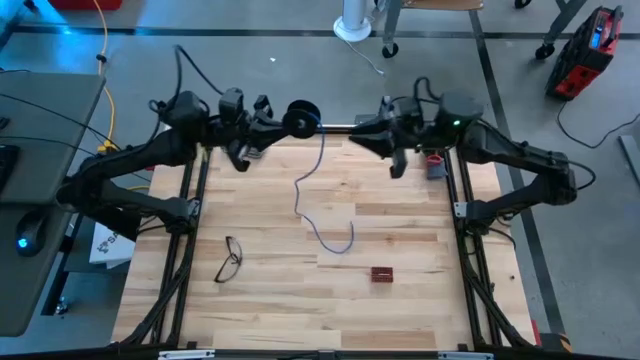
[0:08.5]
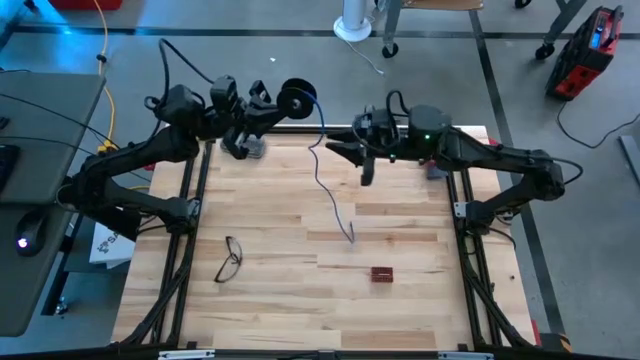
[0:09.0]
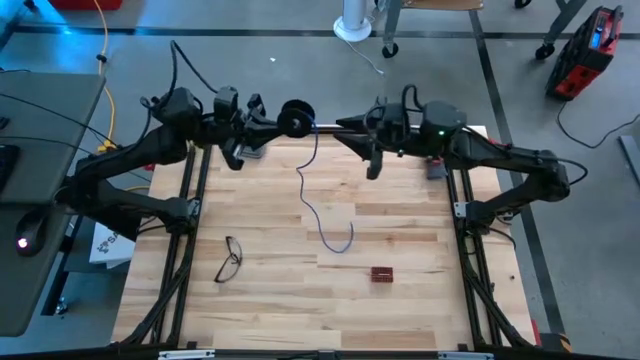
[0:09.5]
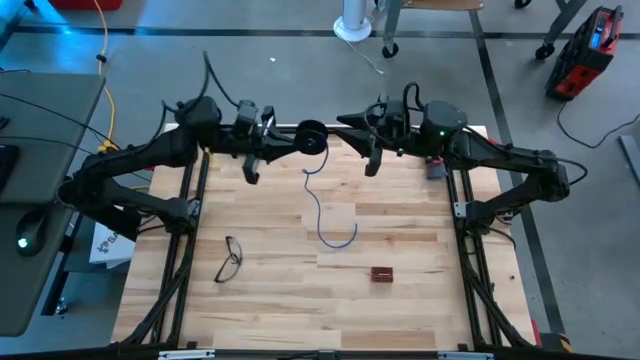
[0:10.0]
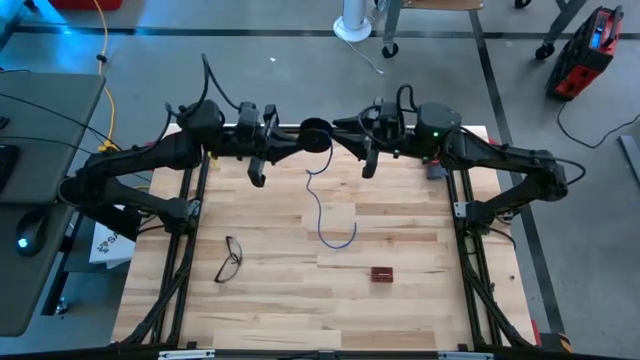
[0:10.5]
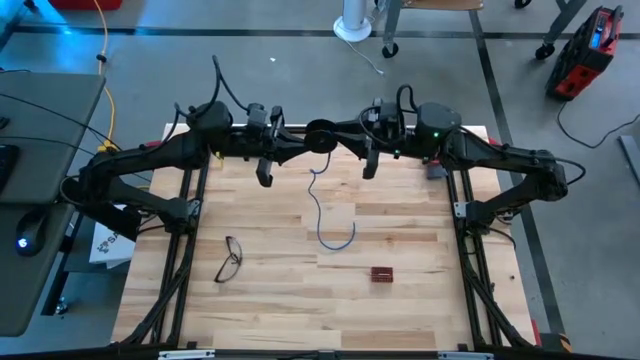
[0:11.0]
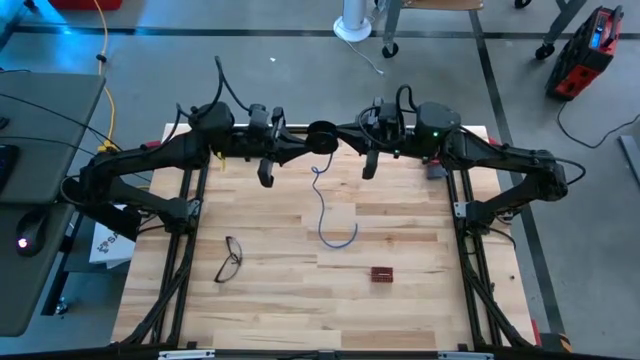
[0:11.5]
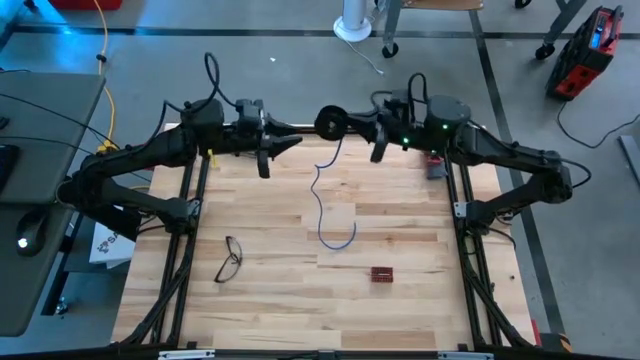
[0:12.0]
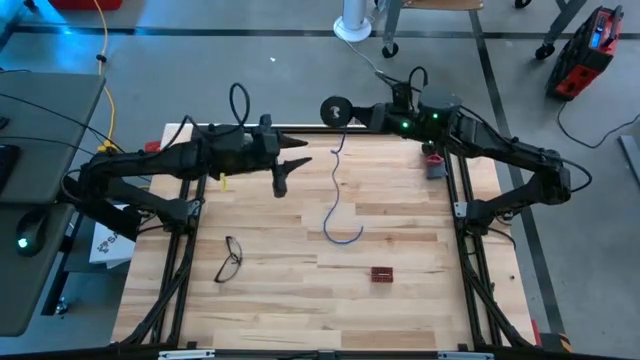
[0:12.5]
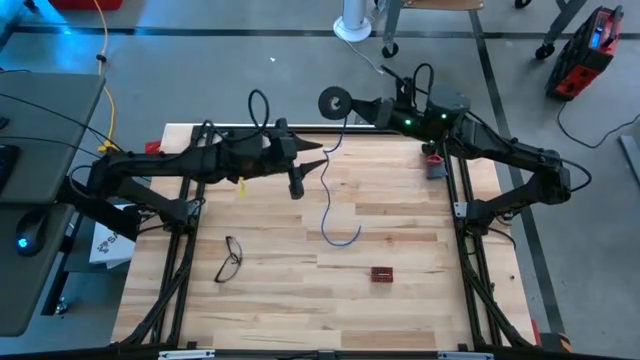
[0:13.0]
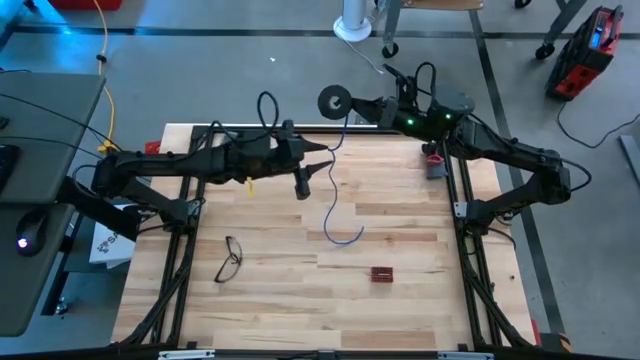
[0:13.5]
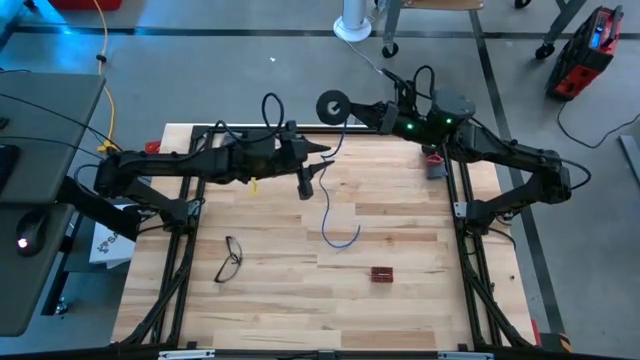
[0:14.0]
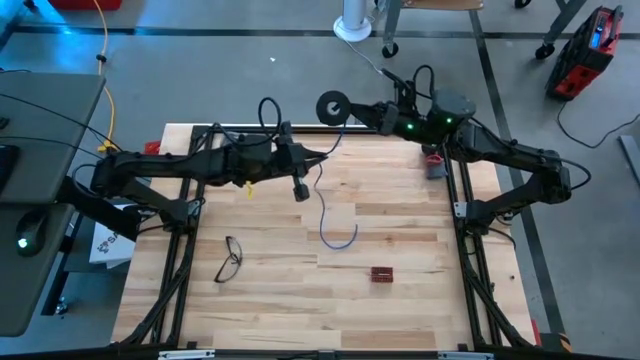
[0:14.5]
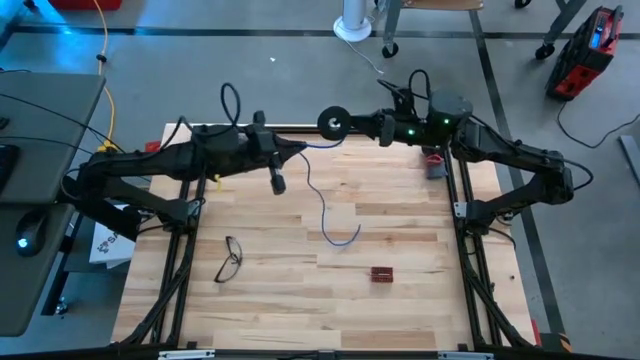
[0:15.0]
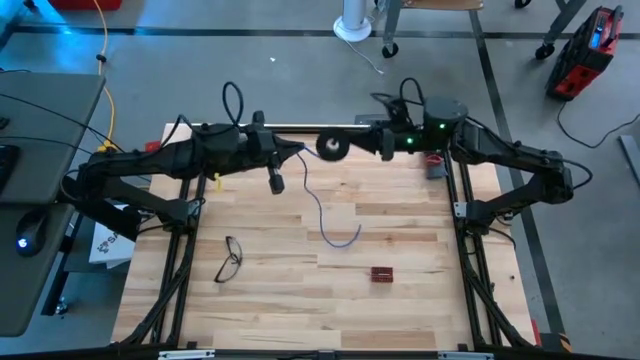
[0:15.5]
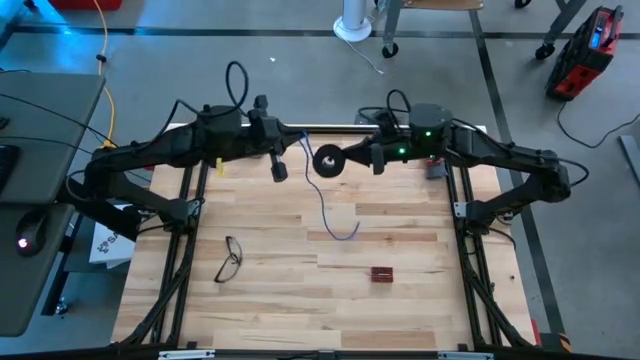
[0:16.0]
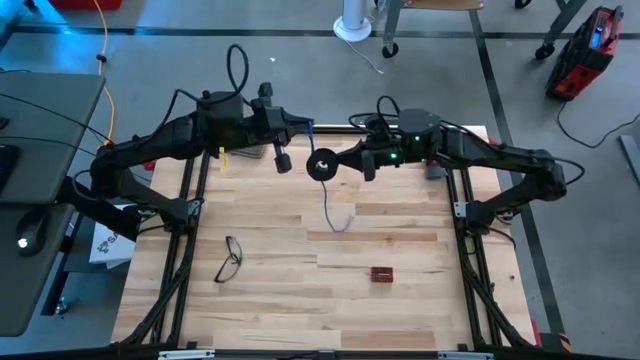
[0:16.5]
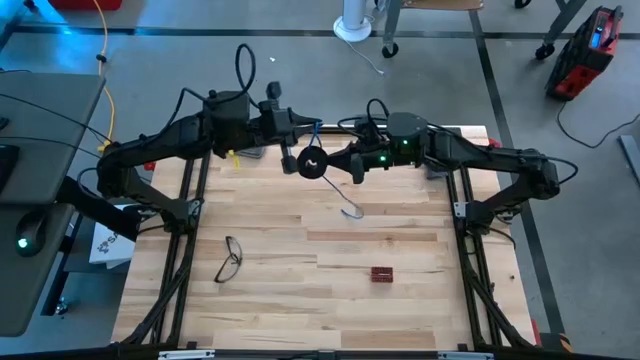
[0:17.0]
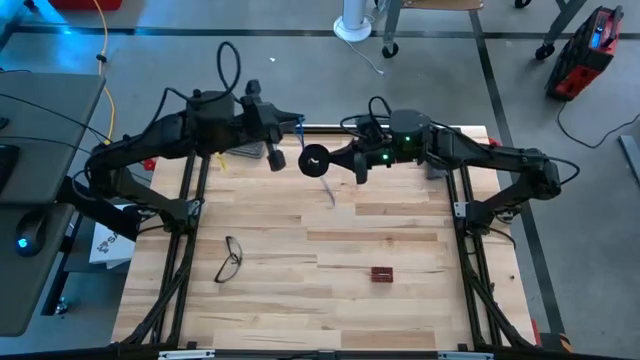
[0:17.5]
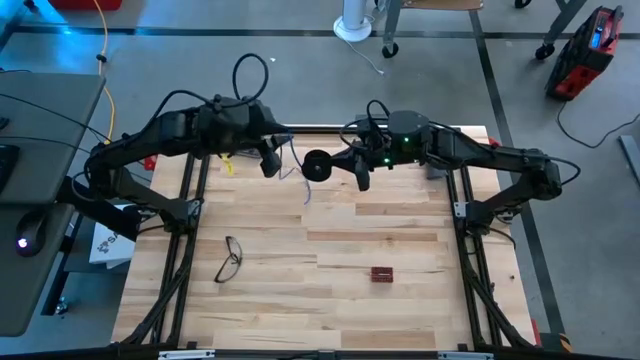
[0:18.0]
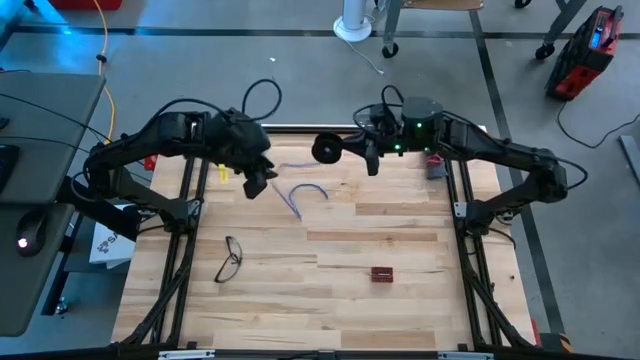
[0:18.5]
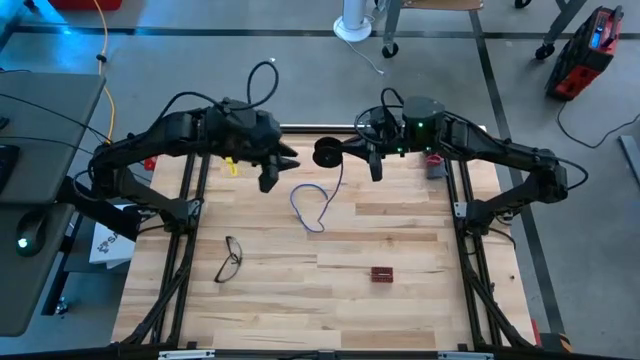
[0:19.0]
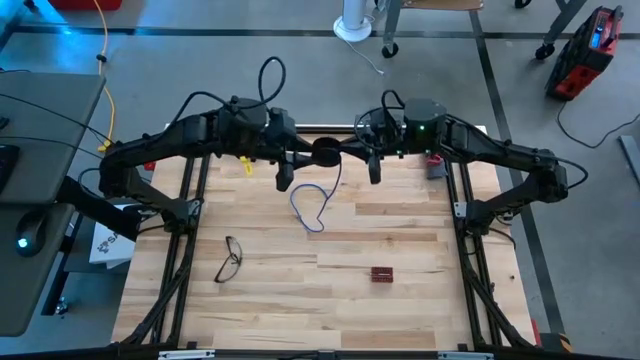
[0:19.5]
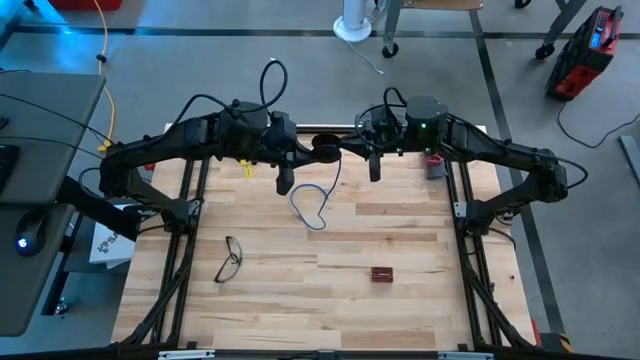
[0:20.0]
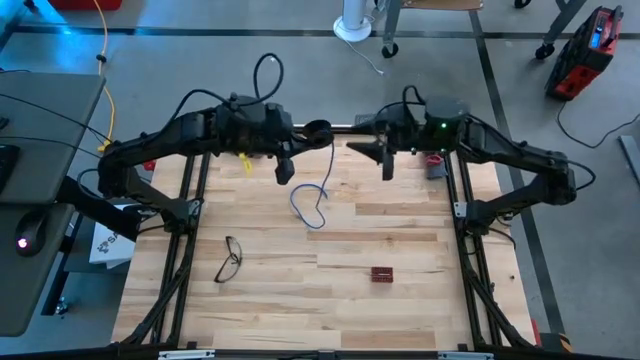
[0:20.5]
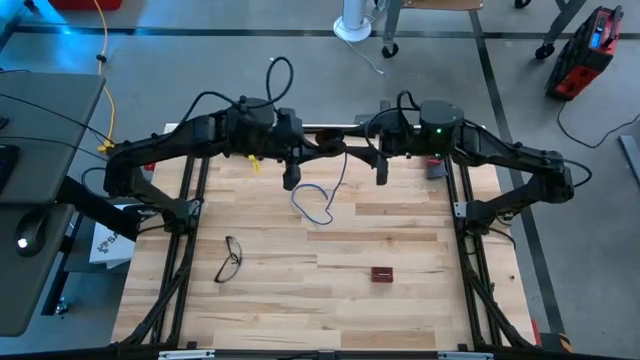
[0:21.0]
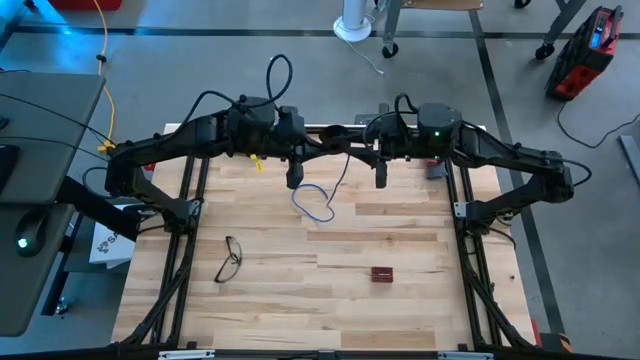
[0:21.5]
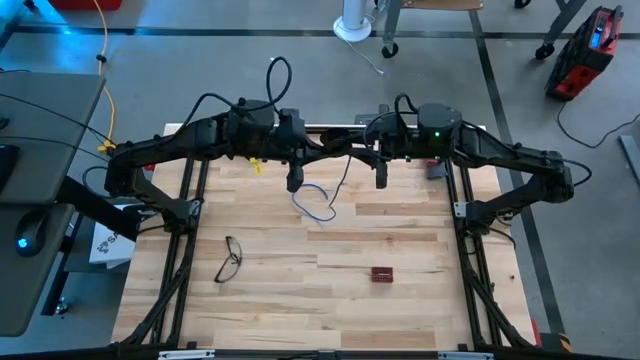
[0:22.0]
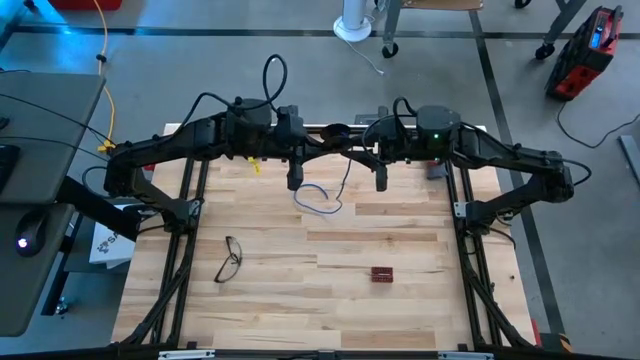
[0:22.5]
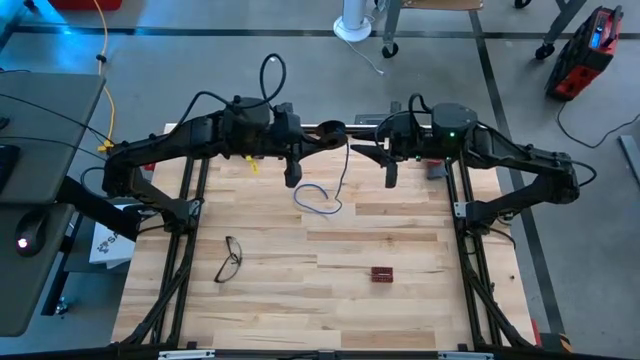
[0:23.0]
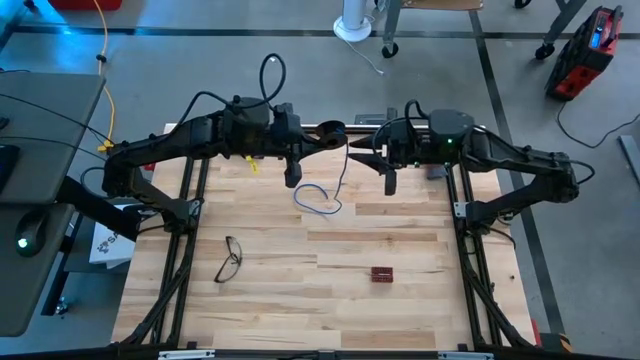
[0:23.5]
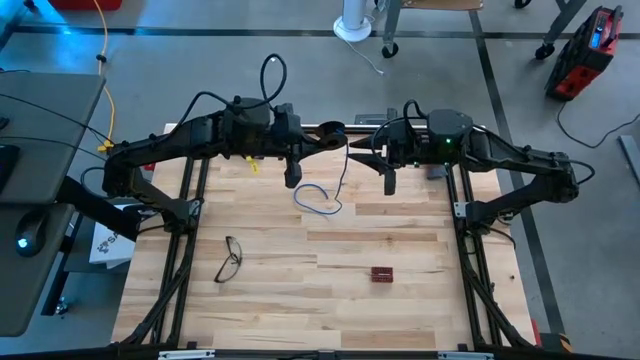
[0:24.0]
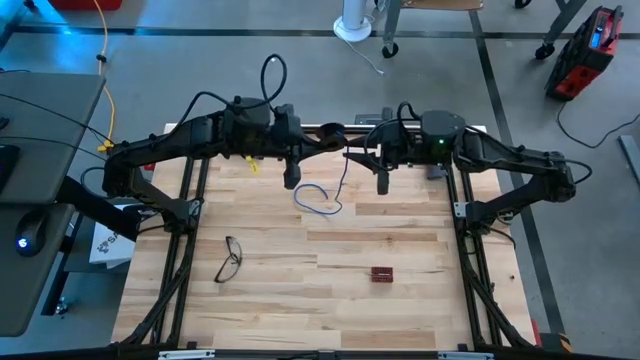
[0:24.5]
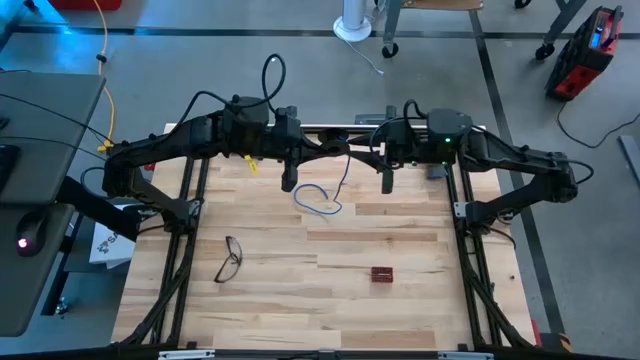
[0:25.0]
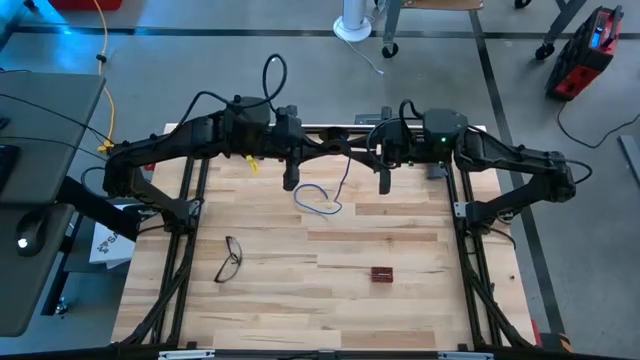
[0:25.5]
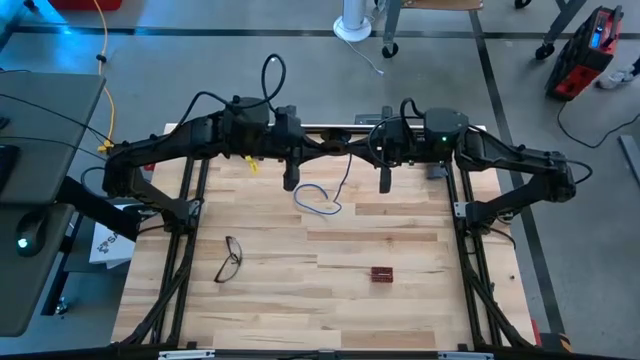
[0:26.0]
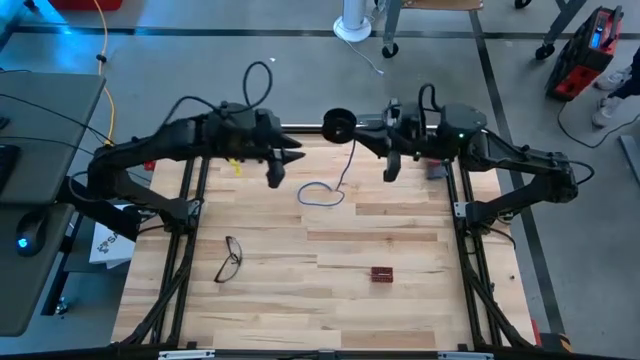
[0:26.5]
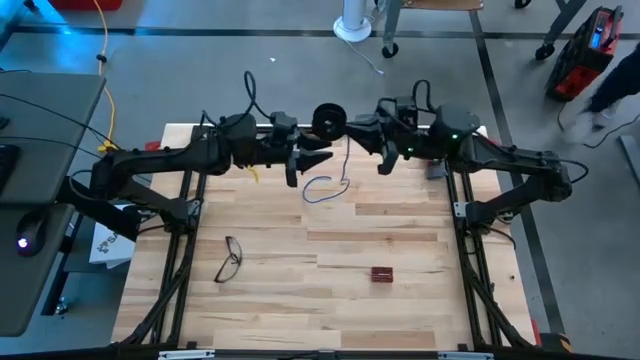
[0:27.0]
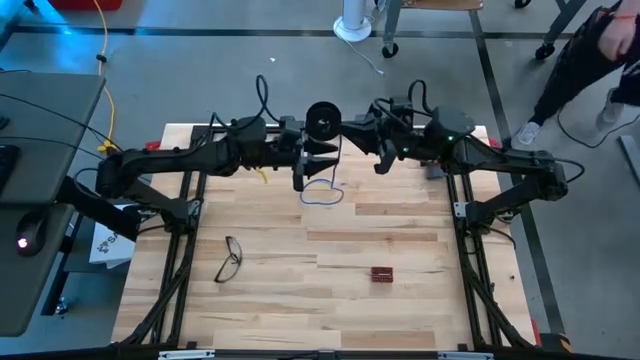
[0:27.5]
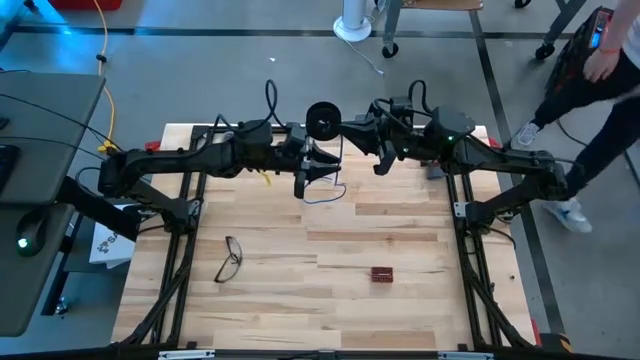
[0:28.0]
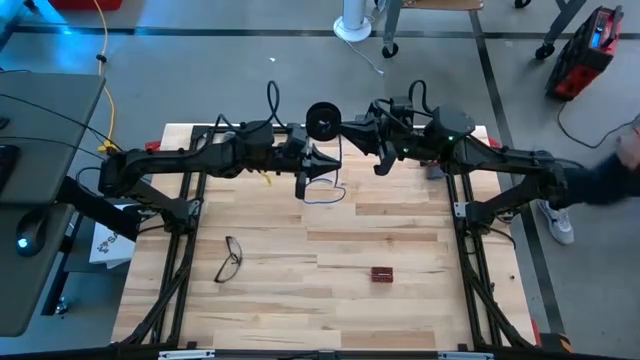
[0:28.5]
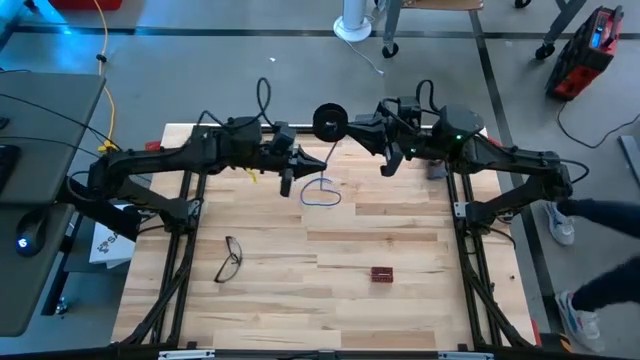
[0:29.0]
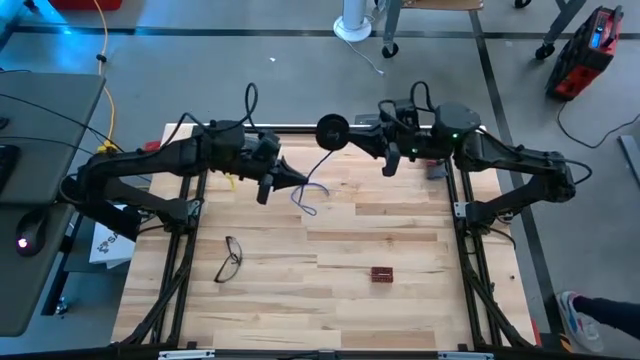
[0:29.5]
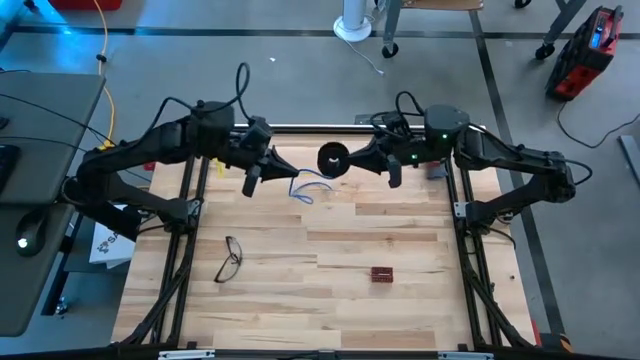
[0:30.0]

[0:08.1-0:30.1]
Task: Coil cords
Coil the blue wire onto the spool
